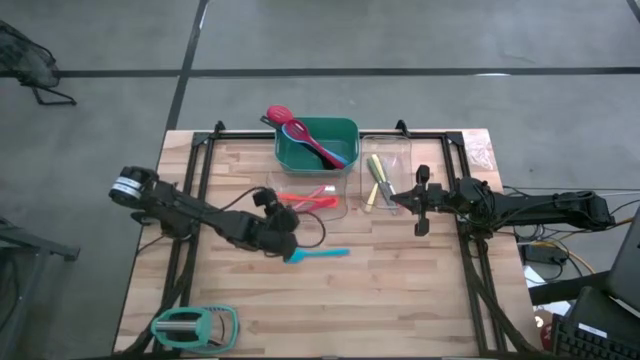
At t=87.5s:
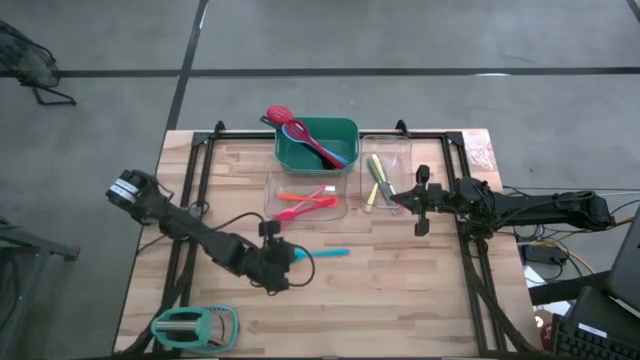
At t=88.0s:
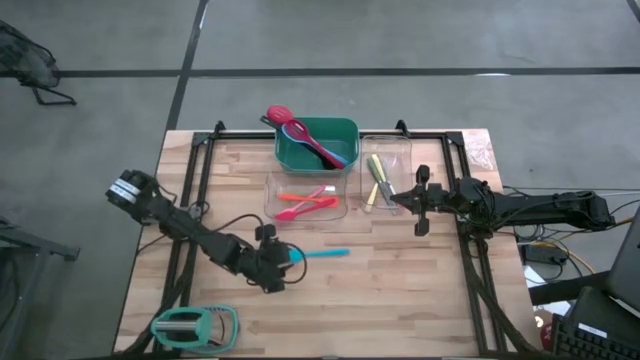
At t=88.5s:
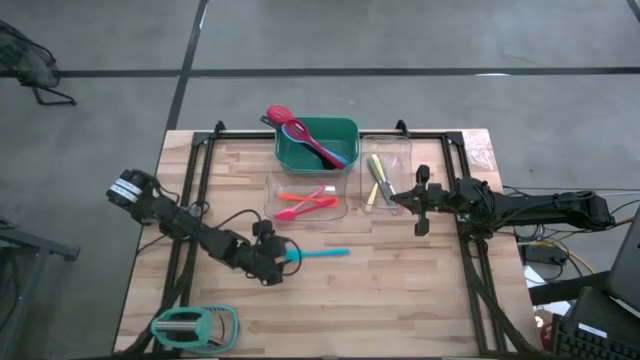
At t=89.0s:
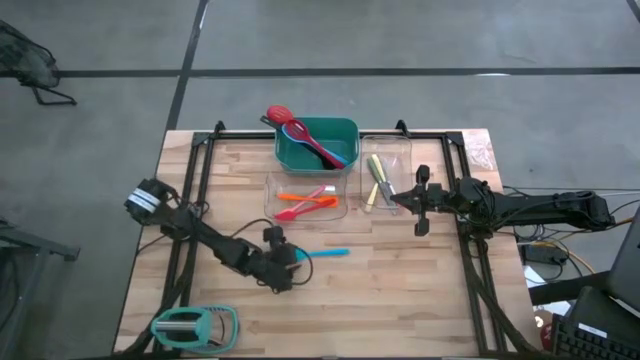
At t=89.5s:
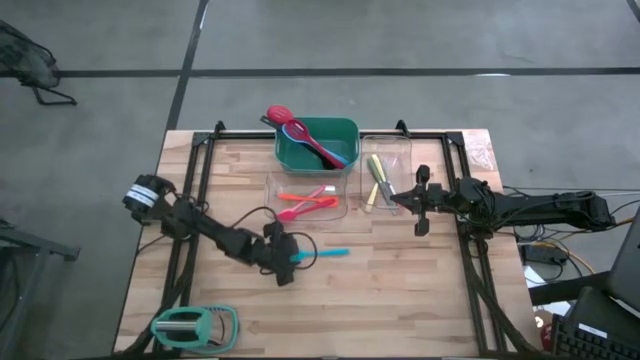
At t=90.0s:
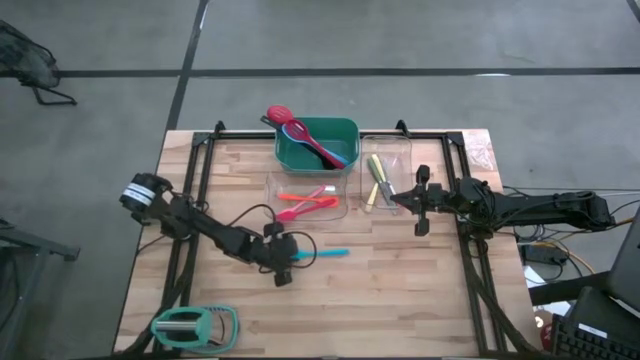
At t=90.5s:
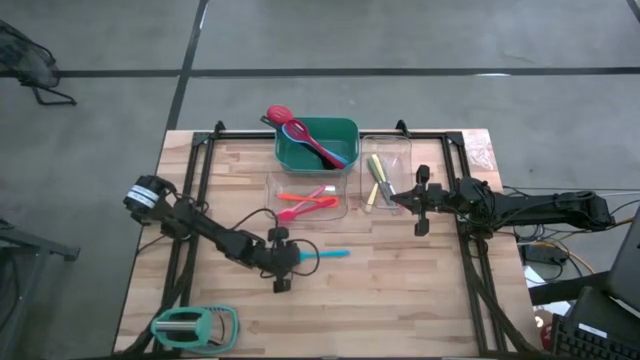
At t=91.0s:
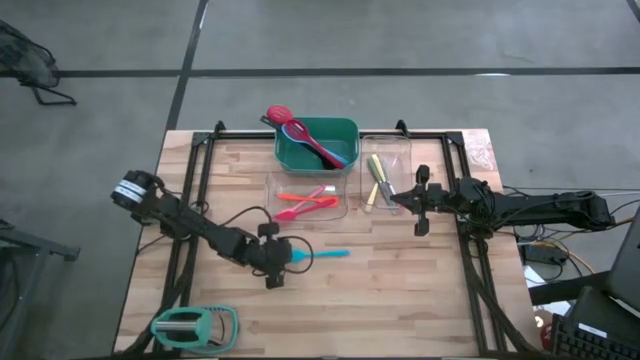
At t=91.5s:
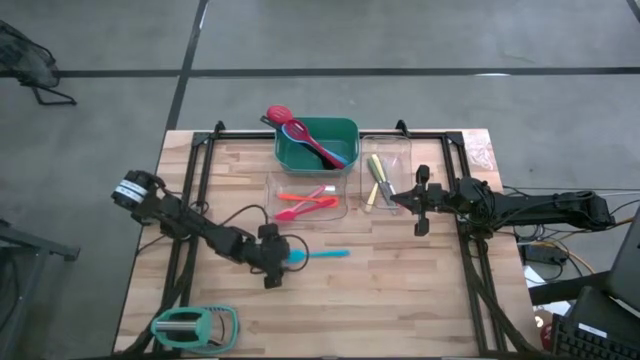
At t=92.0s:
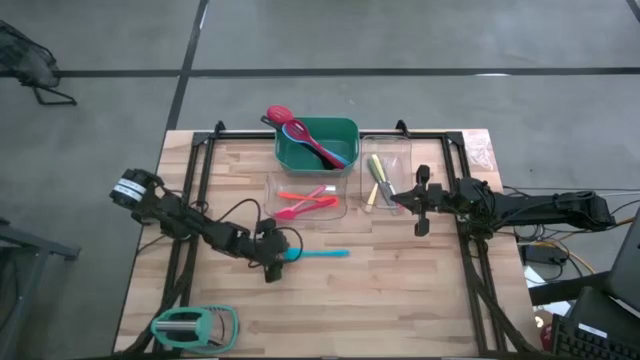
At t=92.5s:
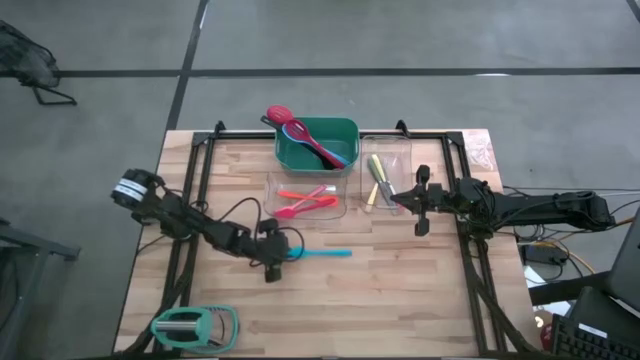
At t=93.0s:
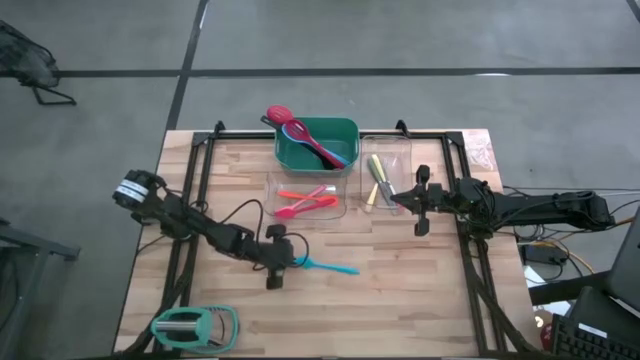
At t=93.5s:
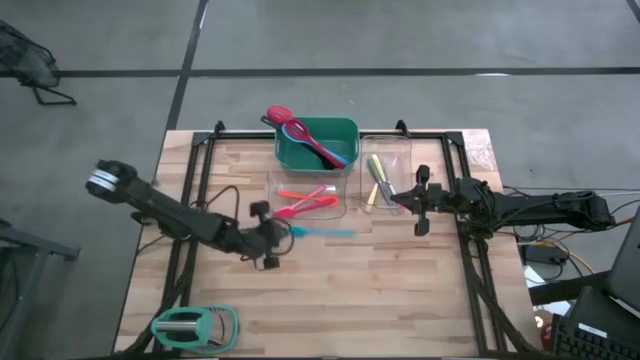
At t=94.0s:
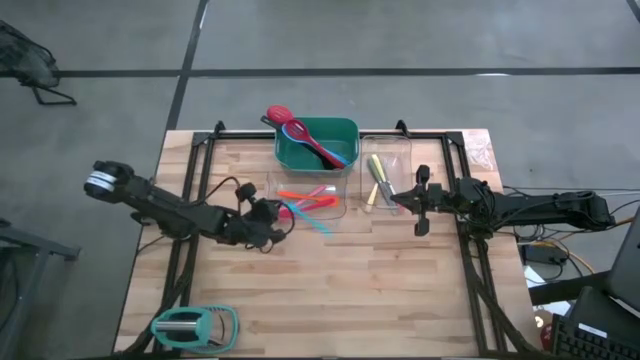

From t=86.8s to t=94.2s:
Task: Pick & Place Kitchen Items
Put the blue spatula into the transparent bin

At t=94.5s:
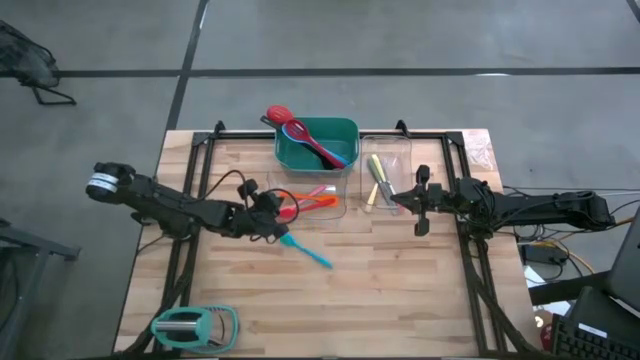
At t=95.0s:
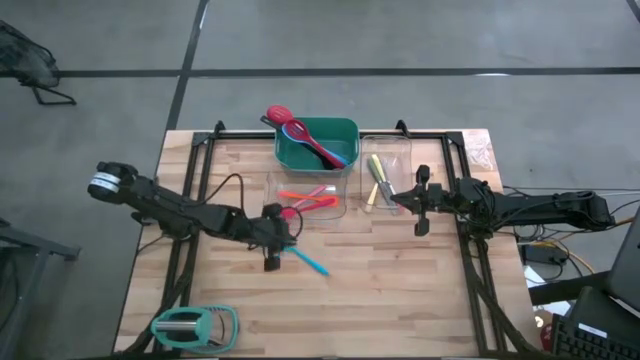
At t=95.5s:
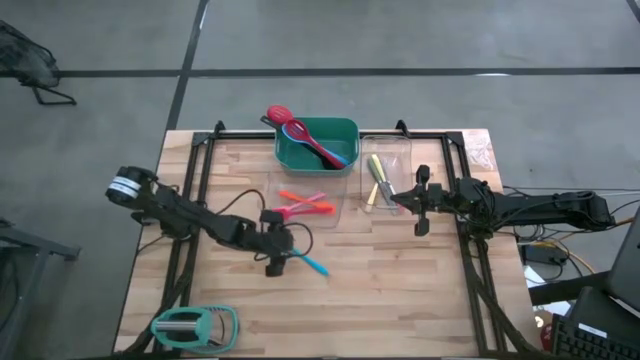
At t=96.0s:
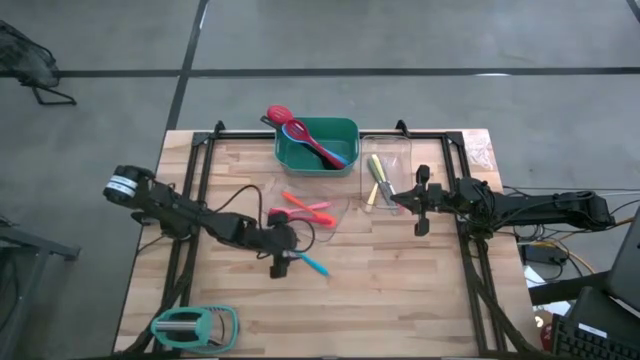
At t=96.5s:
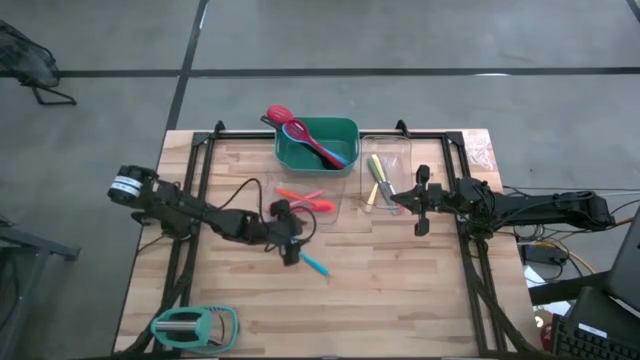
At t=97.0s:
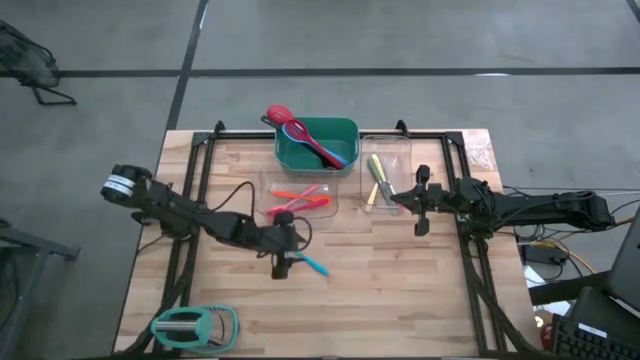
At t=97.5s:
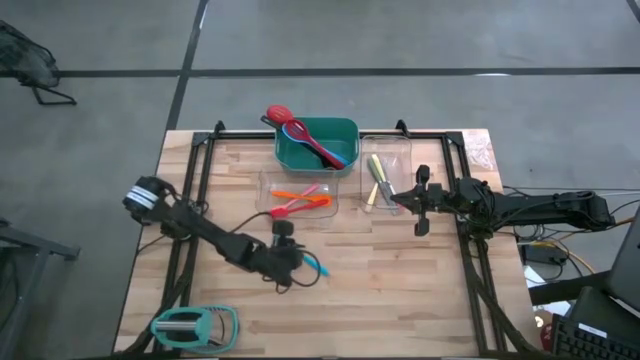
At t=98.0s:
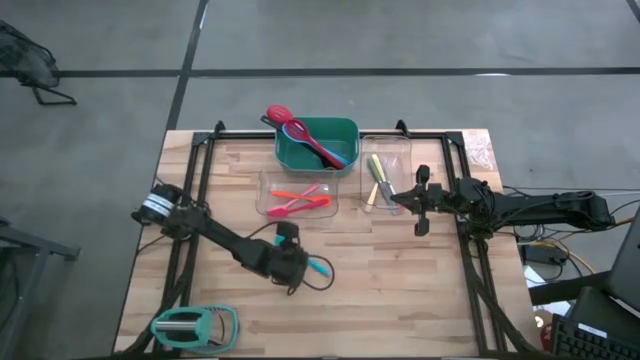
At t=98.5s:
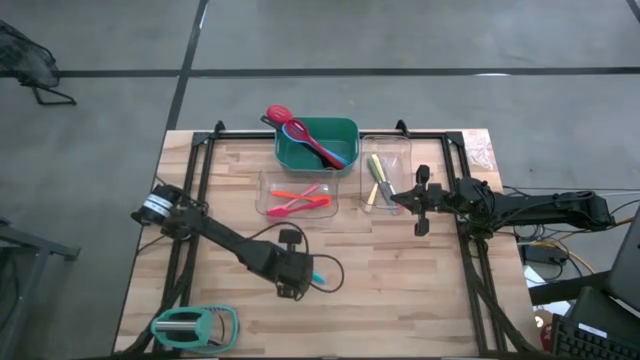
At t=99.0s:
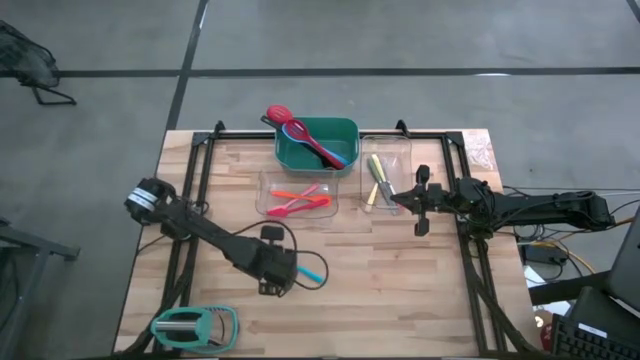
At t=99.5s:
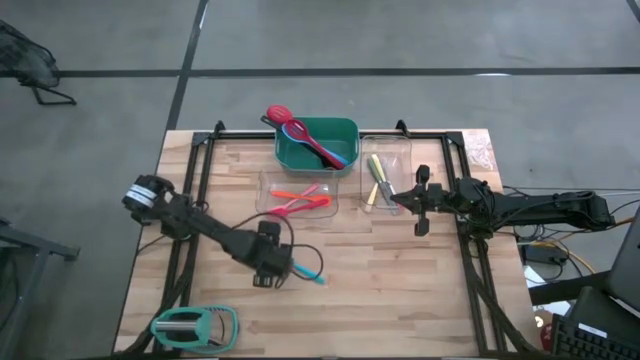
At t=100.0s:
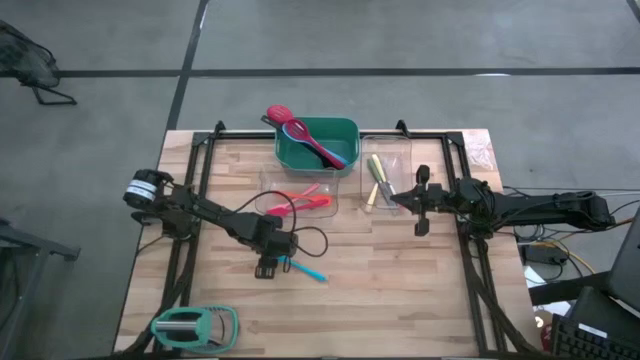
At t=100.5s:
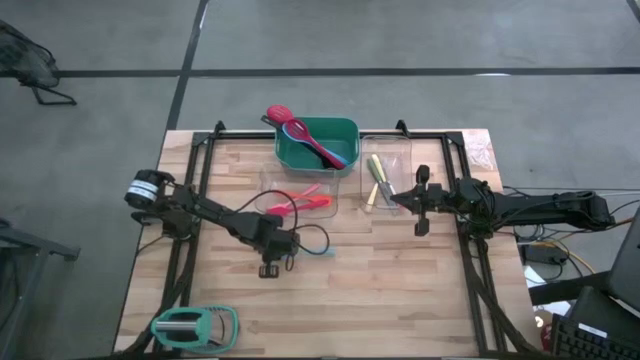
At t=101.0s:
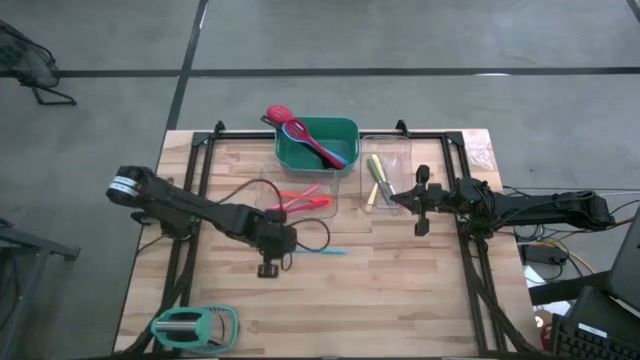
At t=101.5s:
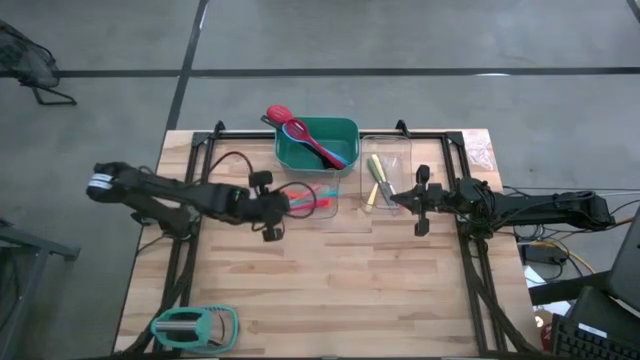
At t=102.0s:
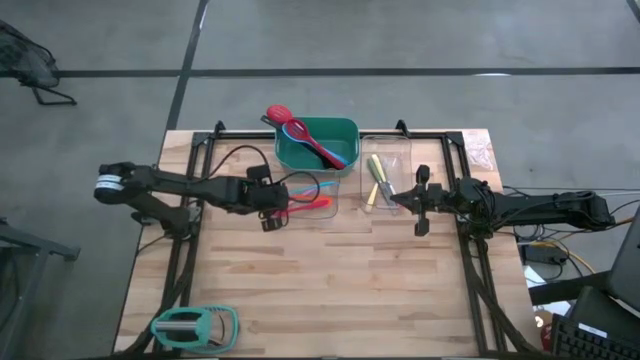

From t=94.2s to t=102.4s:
Put the blue spatula into the left transparent bin

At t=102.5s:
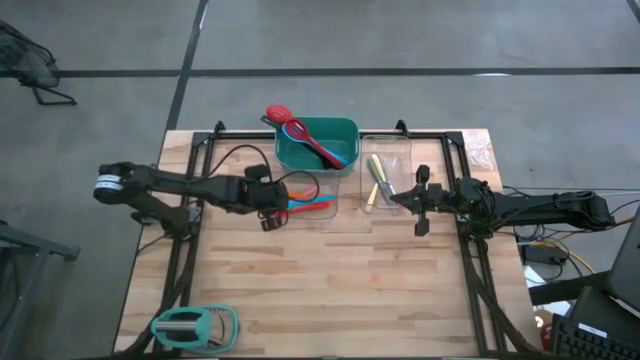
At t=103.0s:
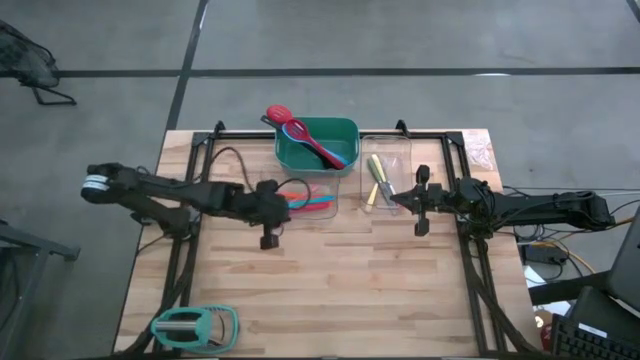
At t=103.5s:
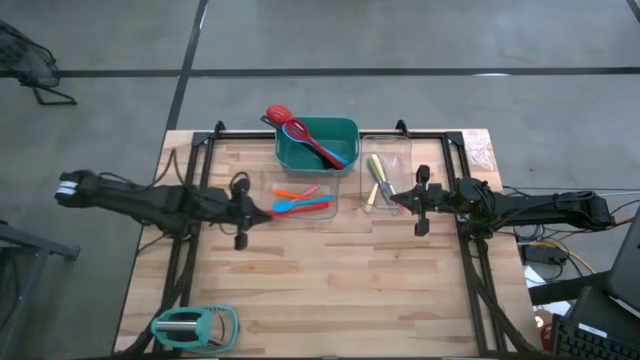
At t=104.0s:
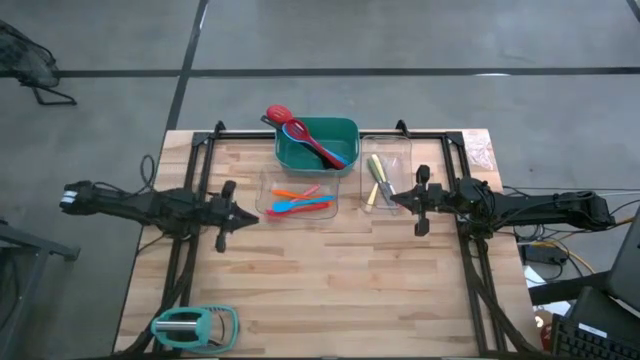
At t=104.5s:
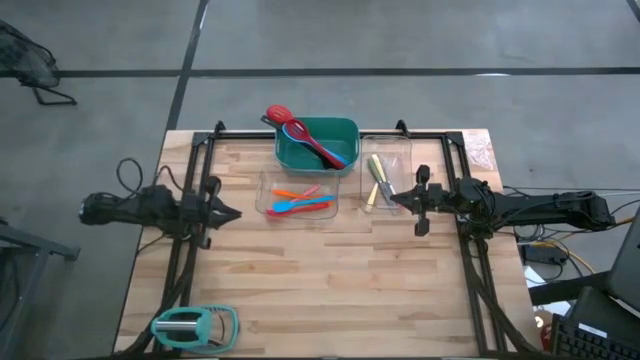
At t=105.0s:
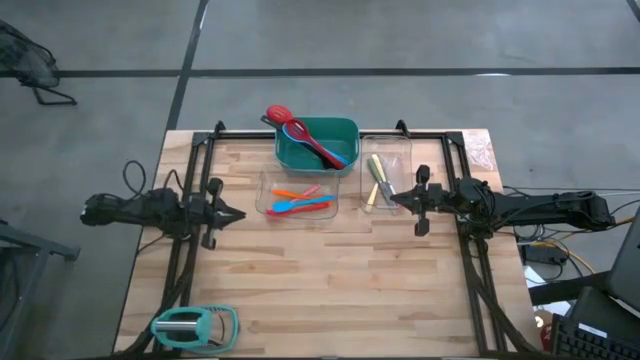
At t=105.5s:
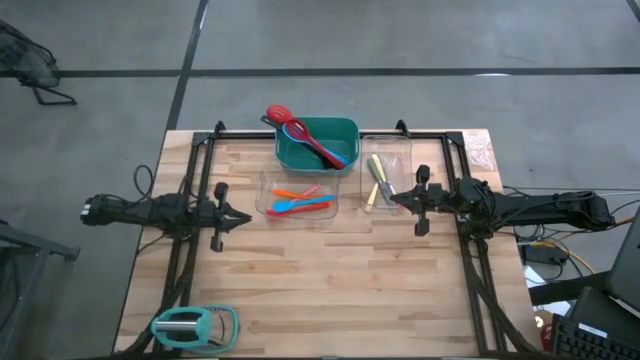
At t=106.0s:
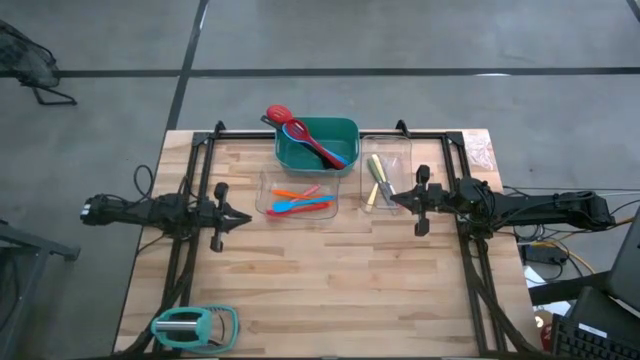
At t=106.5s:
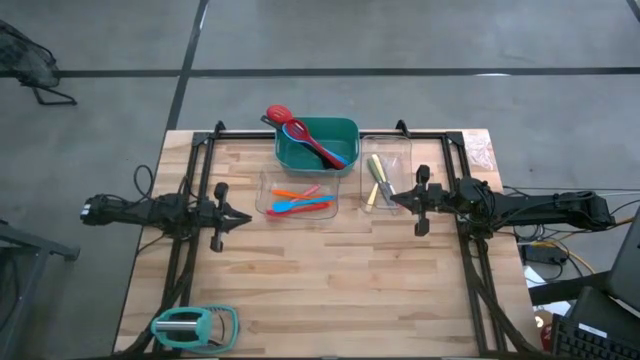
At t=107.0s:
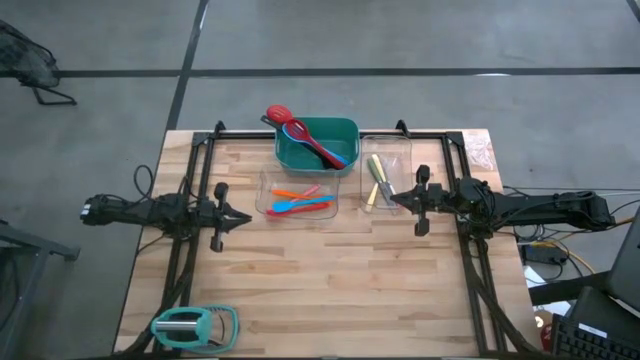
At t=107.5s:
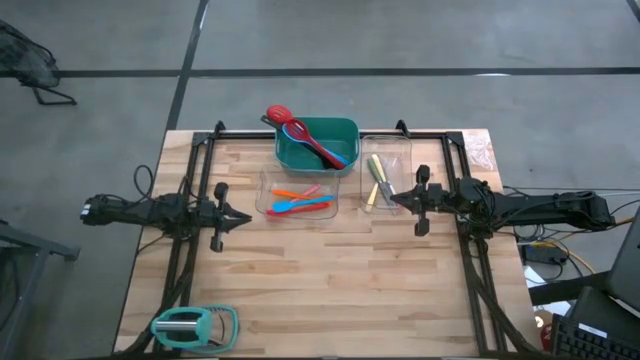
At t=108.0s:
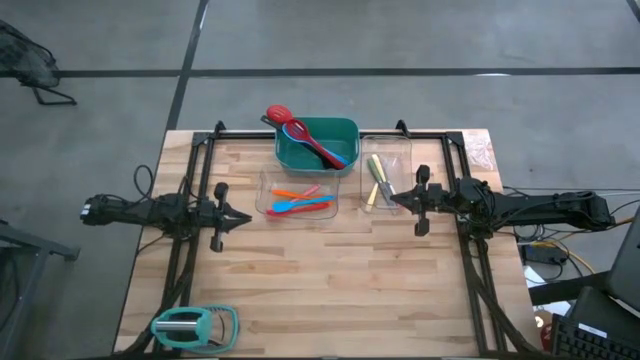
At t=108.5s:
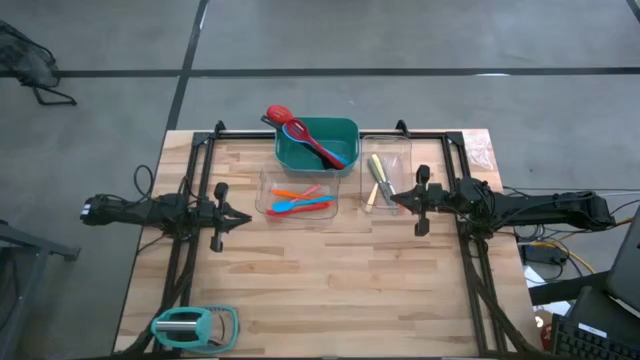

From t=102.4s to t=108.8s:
Return to Home Position
